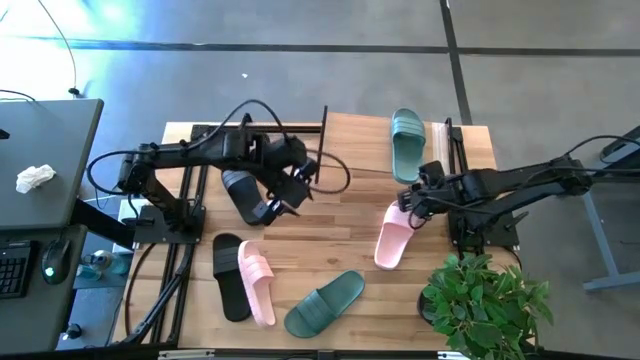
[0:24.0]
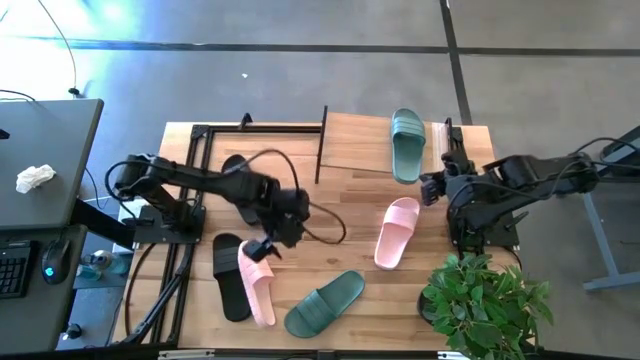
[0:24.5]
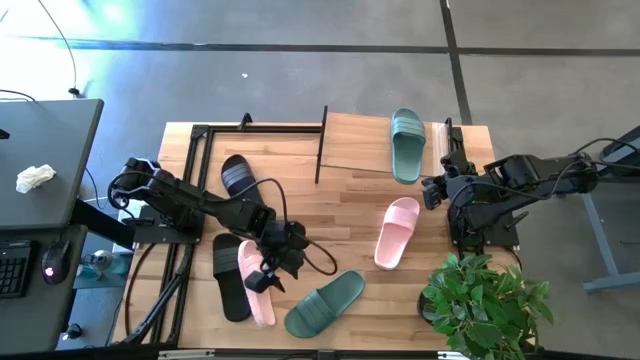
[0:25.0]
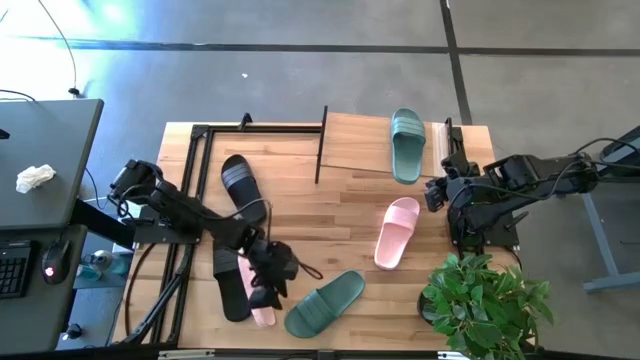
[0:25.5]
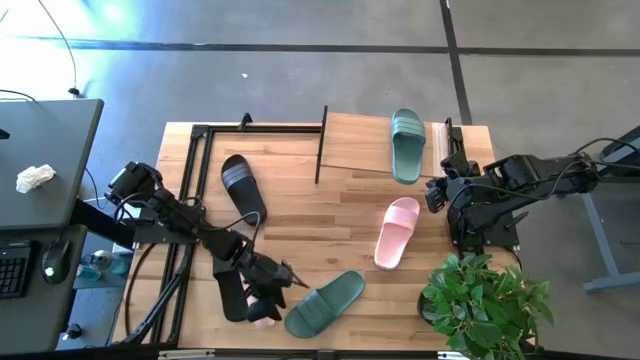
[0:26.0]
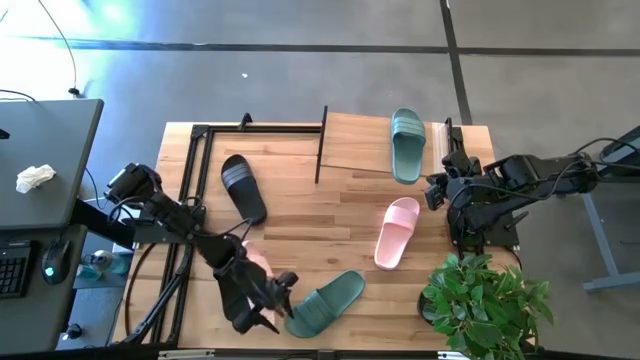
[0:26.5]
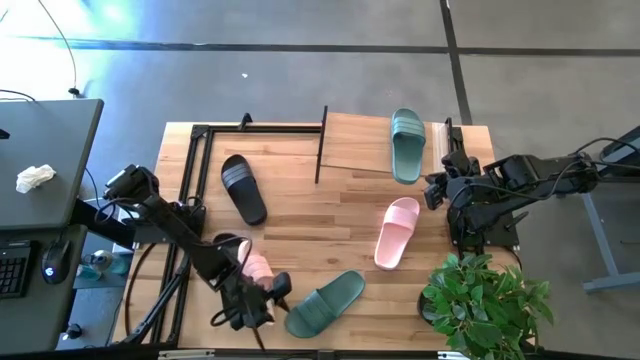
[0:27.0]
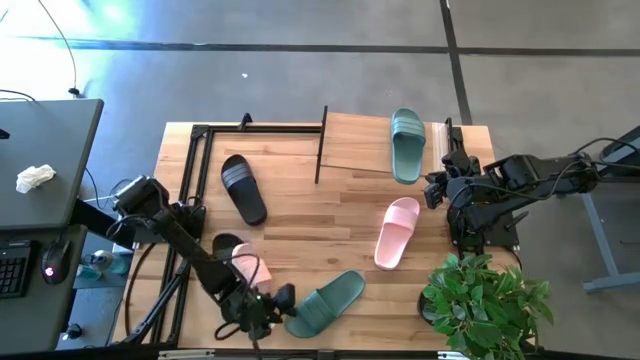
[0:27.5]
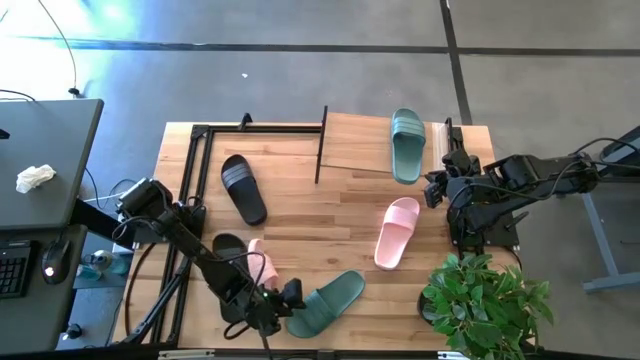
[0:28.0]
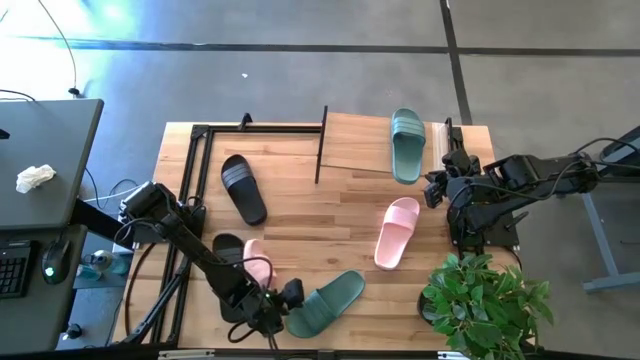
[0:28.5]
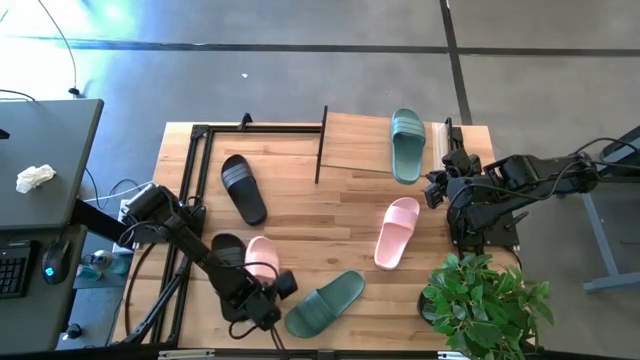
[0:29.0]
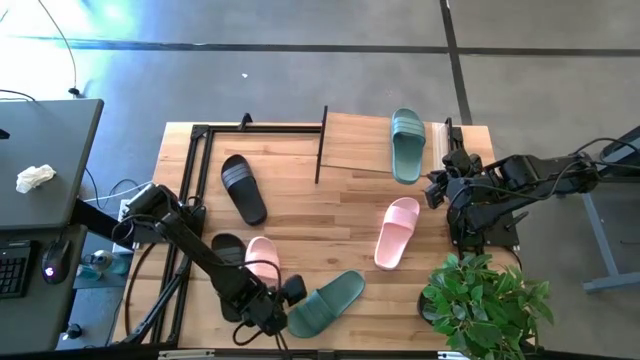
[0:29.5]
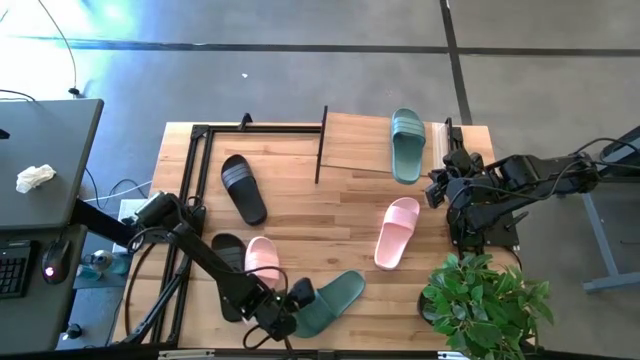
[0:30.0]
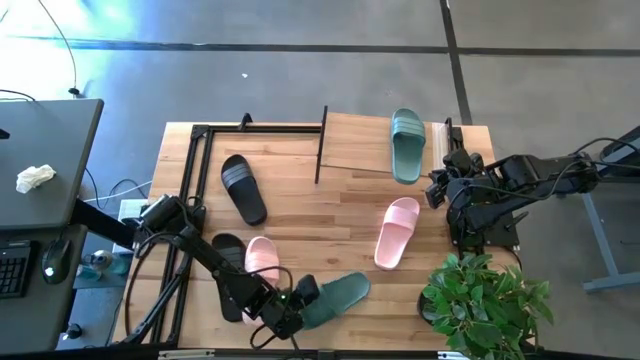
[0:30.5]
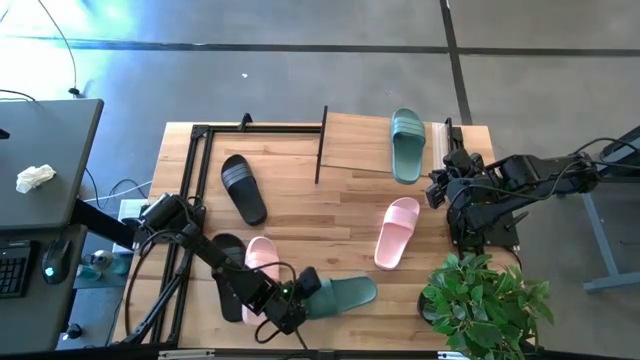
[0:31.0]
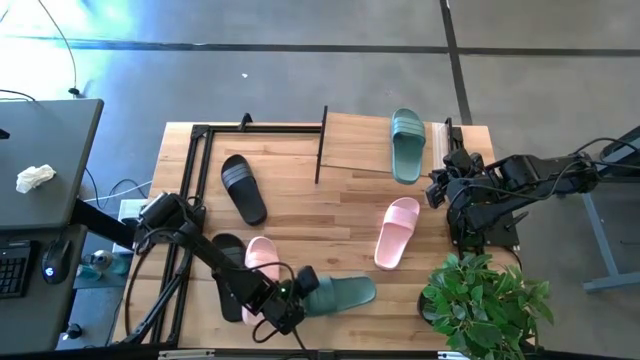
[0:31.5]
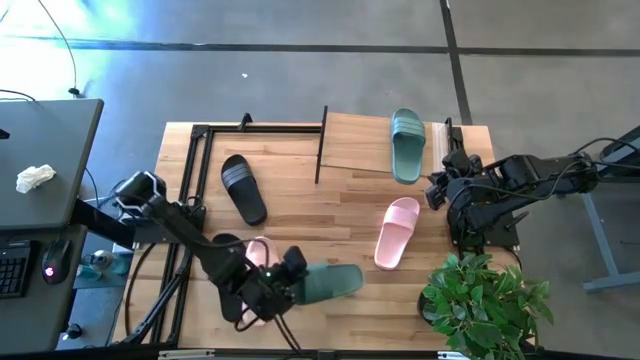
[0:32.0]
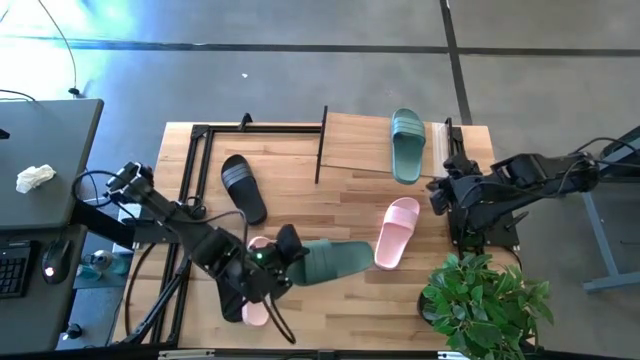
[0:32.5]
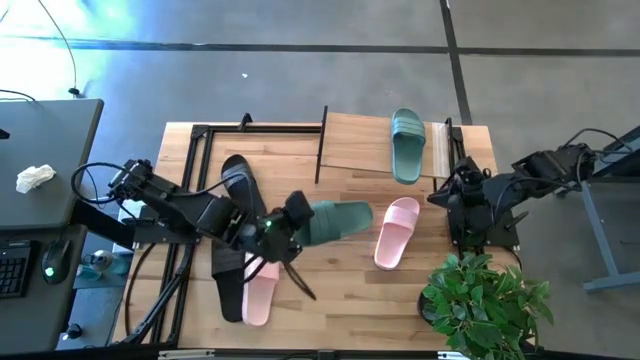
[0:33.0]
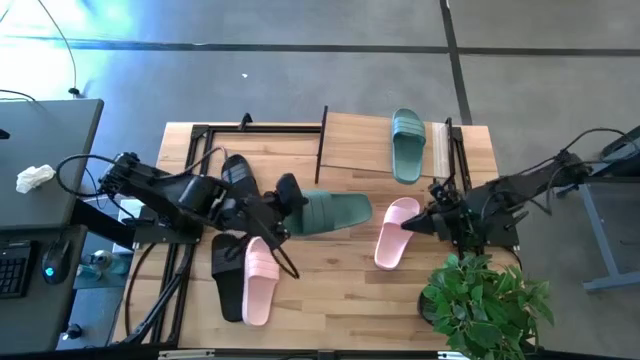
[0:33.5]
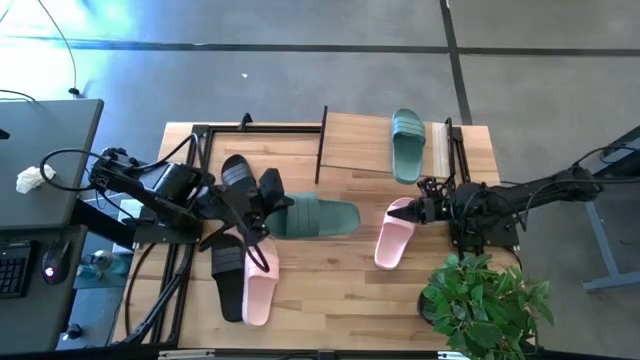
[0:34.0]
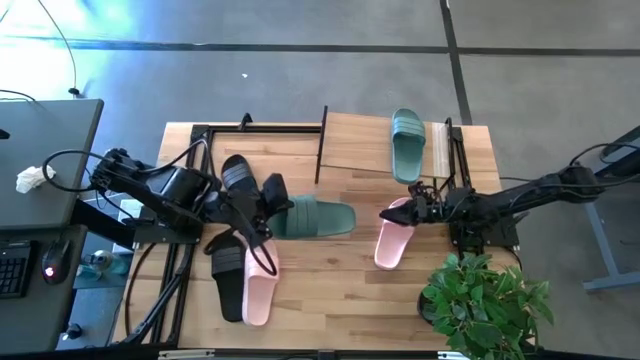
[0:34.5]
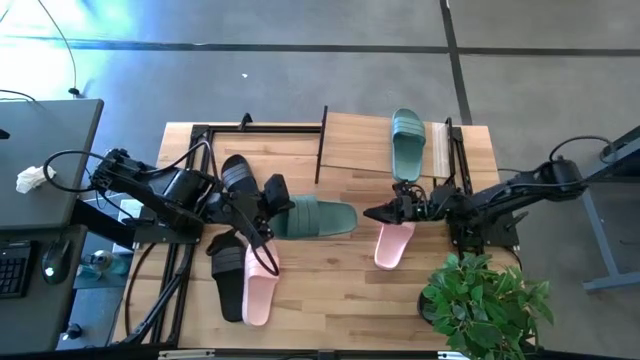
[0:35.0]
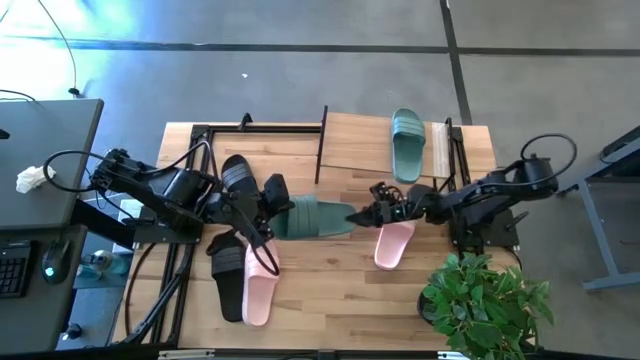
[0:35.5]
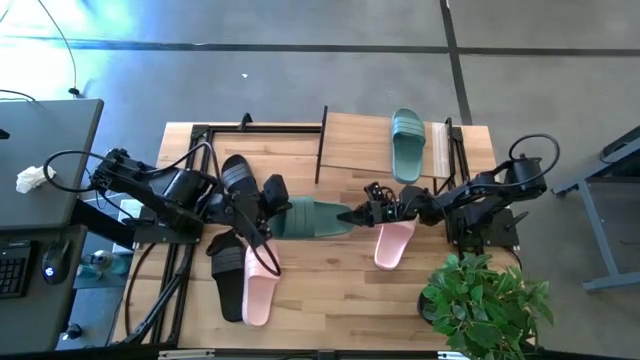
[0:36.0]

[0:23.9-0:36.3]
Task: Pick and place slides into the shelf
Put the blue slides on the shelf

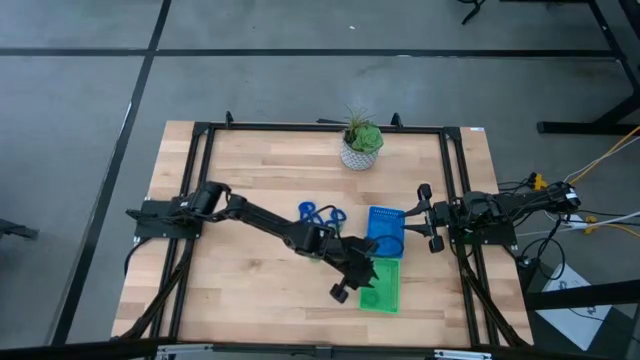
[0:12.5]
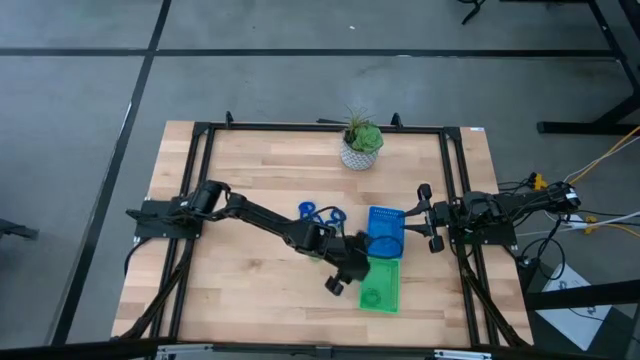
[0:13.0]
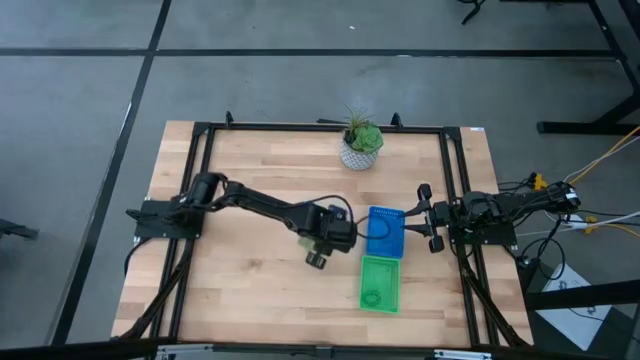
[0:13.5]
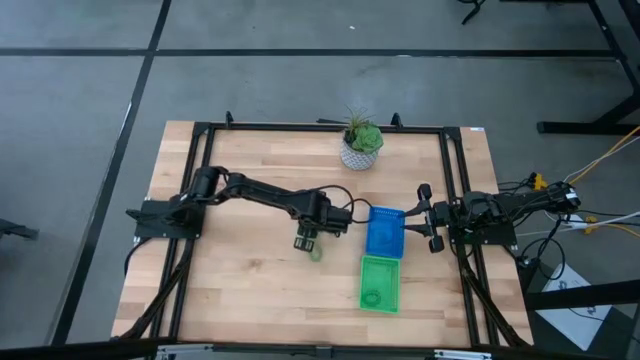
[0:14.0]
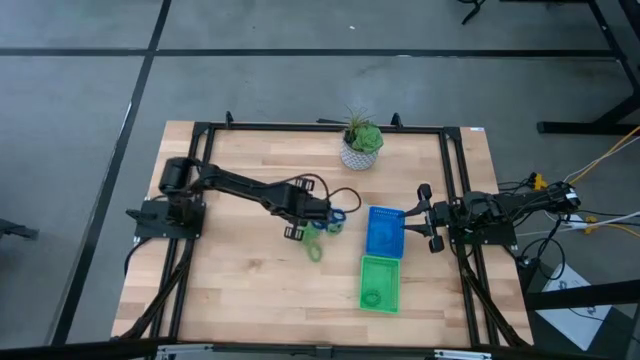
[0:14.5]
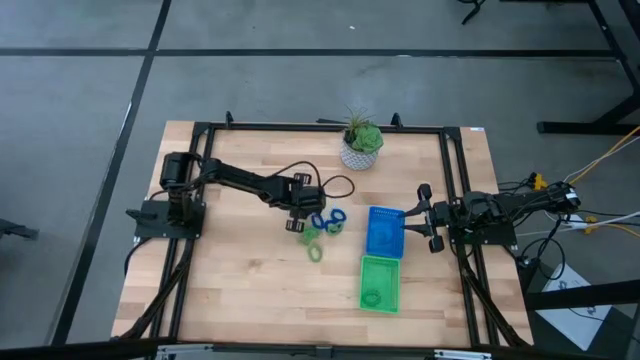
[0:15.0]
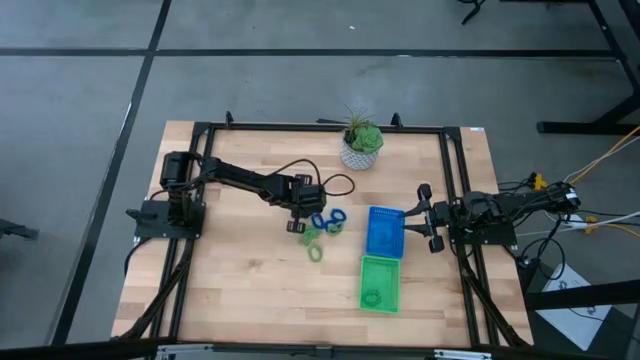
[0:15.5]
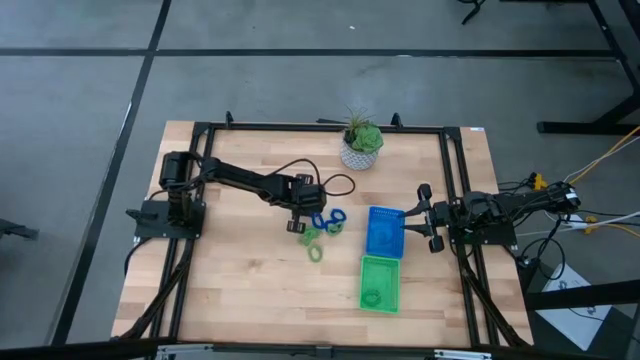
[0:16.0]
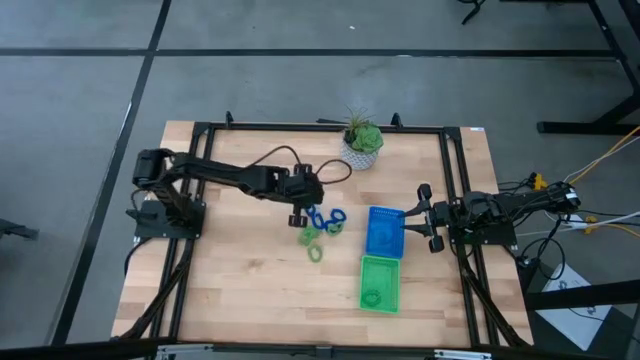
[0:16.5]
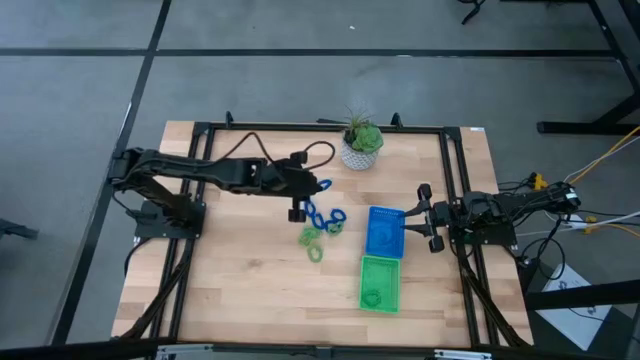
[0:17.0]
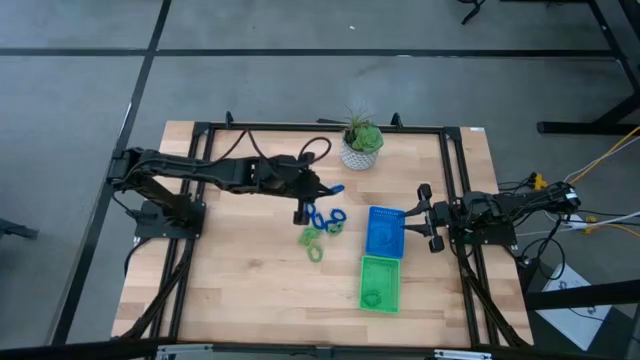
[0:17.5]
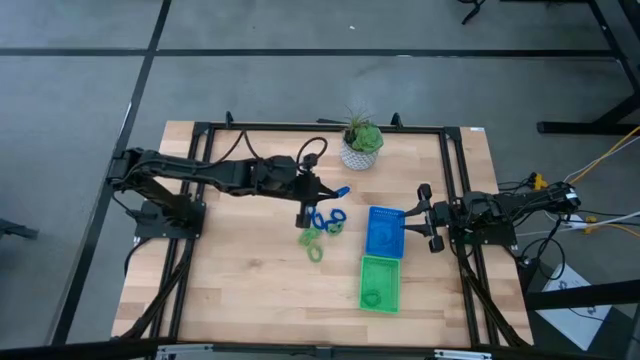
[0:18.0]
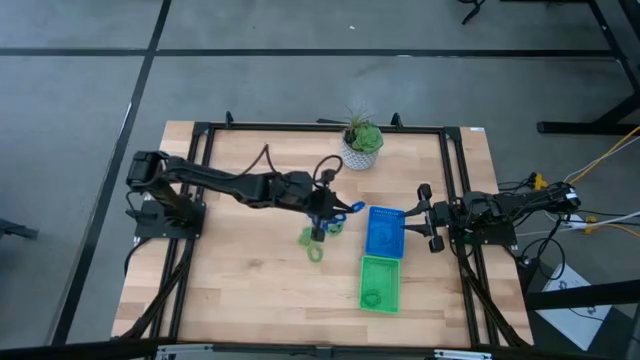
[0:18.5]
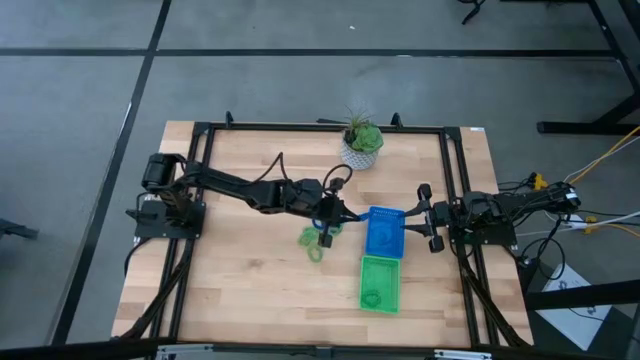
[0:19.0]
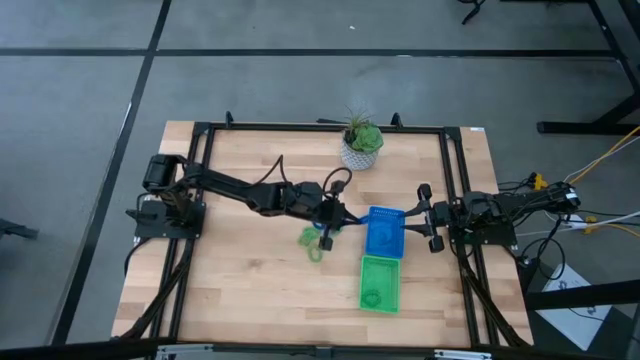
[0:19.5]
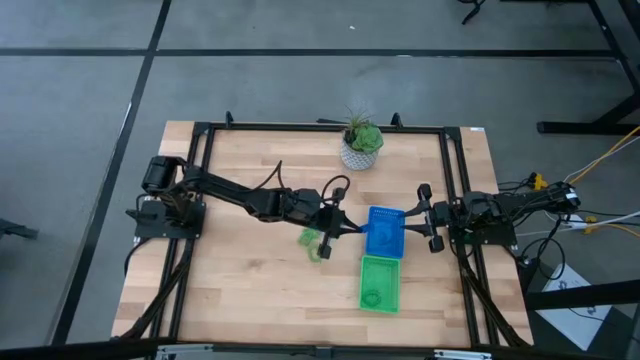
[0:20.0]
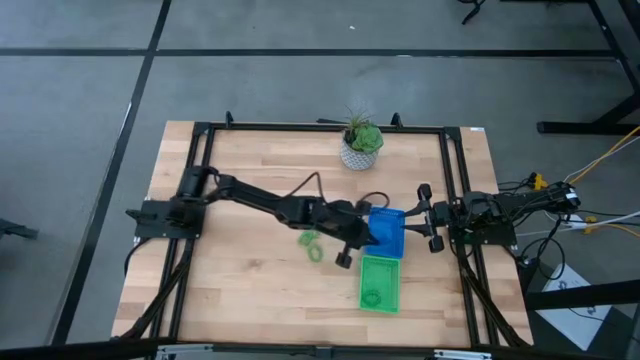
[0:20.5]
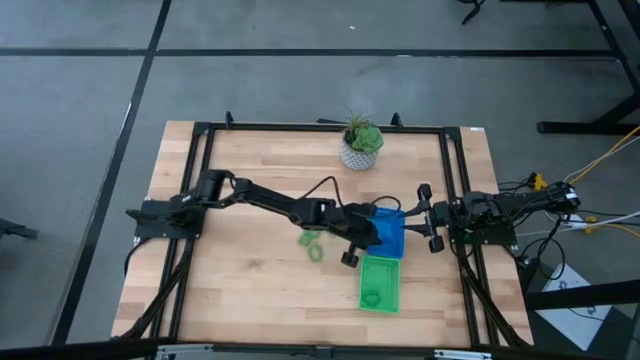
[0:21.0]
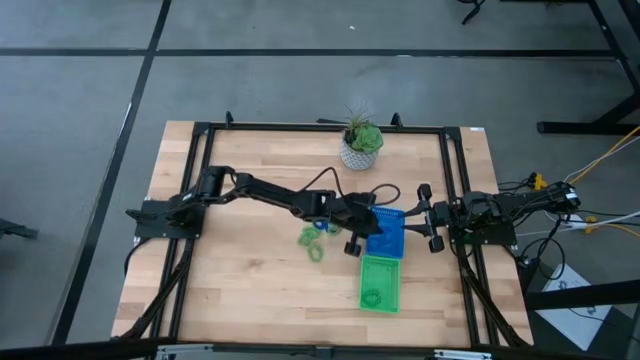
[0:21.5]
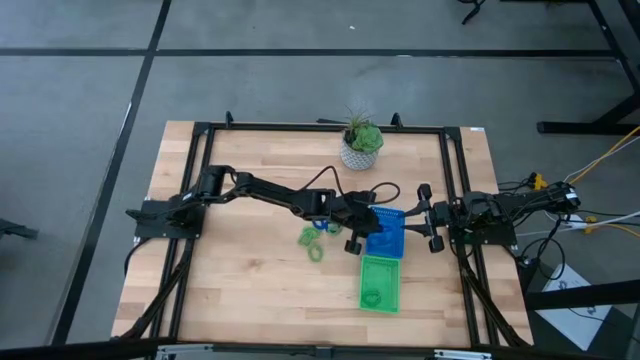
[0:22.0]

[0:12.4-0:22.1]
Task: Sort spring keychains
Put the blue spring keychain into the blue bin
